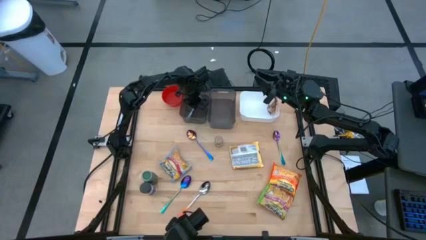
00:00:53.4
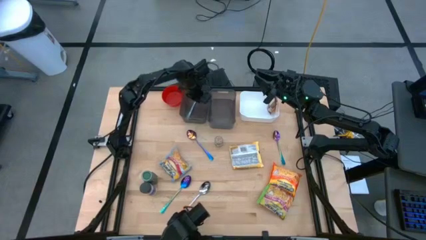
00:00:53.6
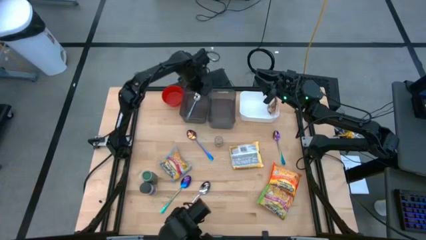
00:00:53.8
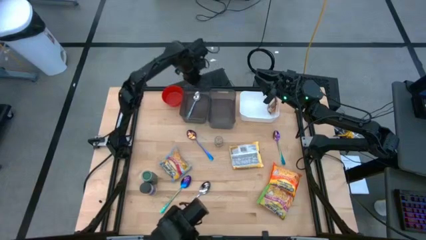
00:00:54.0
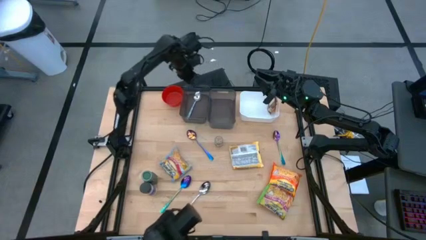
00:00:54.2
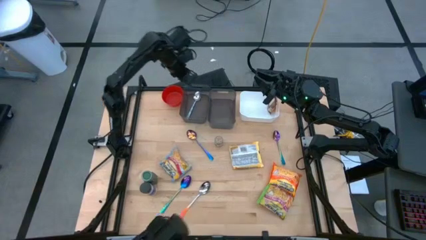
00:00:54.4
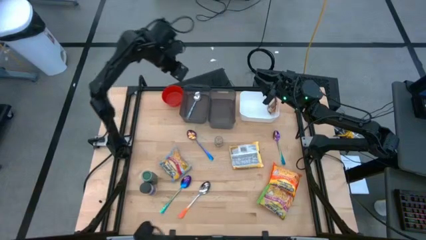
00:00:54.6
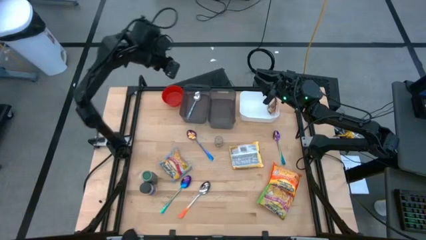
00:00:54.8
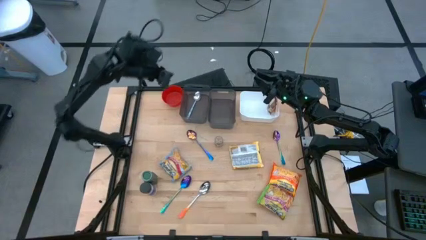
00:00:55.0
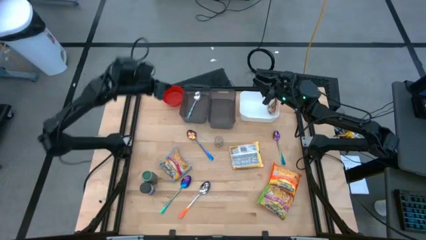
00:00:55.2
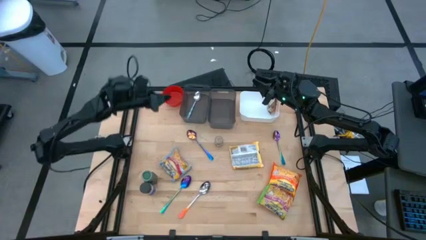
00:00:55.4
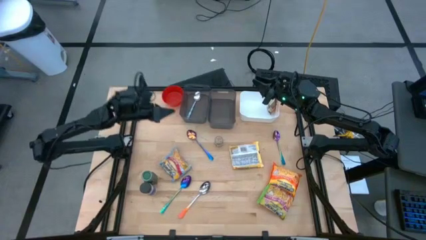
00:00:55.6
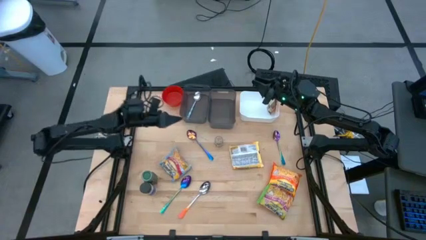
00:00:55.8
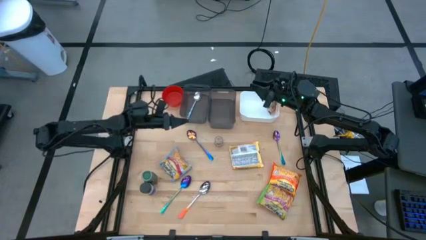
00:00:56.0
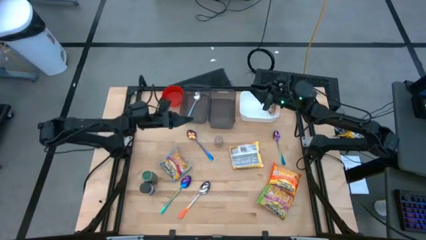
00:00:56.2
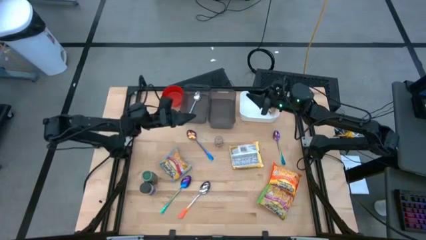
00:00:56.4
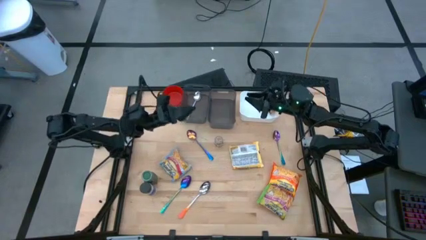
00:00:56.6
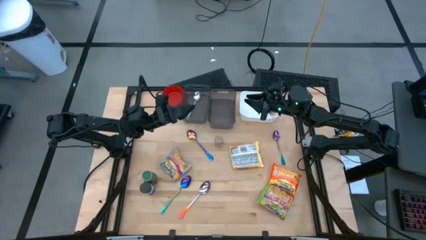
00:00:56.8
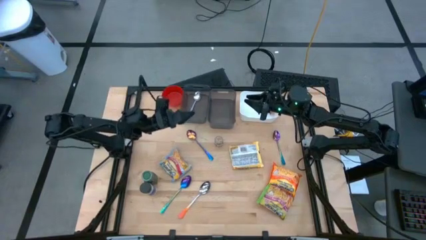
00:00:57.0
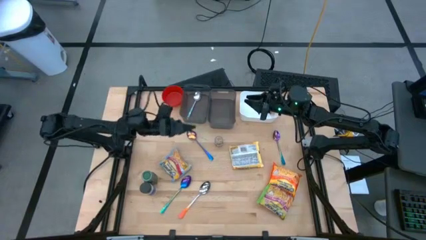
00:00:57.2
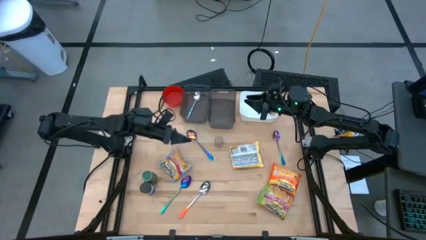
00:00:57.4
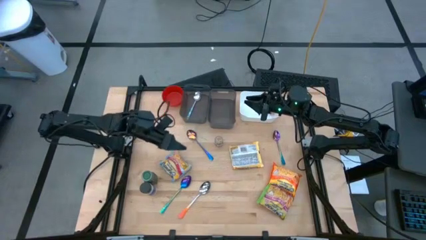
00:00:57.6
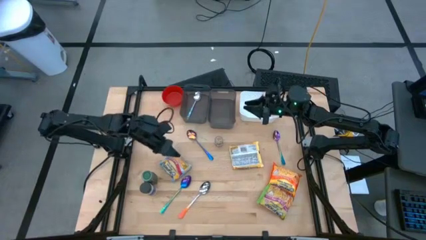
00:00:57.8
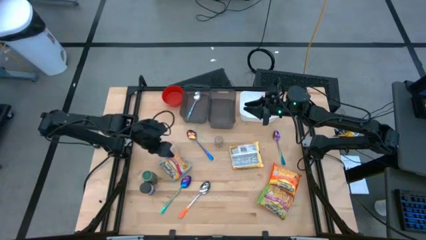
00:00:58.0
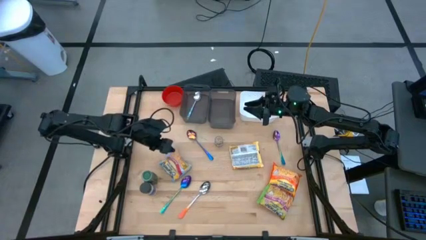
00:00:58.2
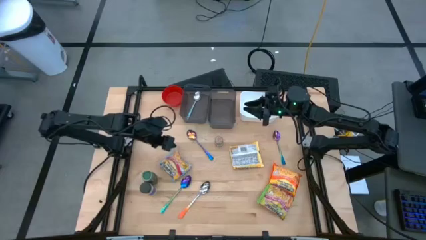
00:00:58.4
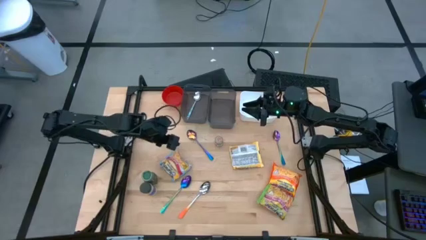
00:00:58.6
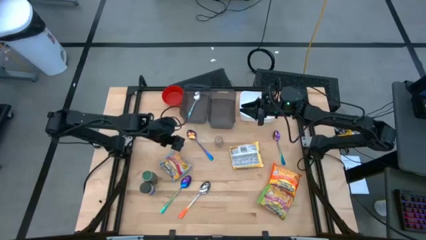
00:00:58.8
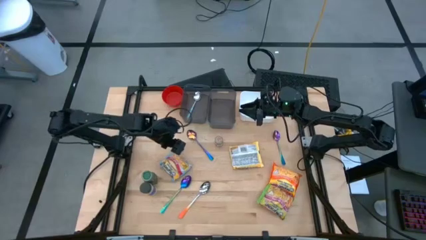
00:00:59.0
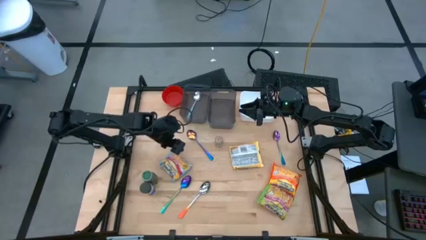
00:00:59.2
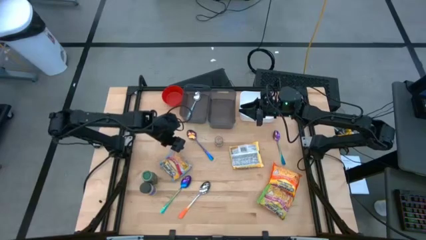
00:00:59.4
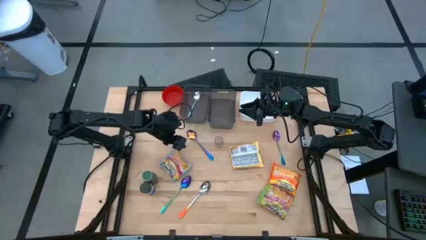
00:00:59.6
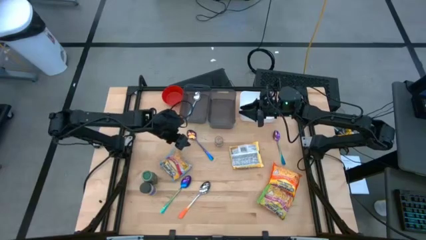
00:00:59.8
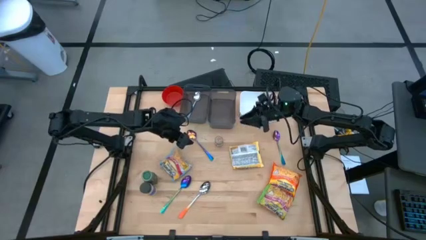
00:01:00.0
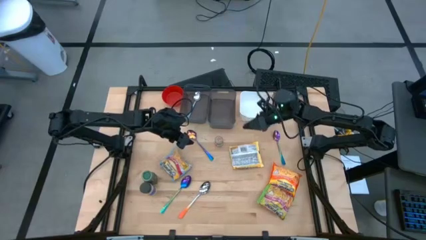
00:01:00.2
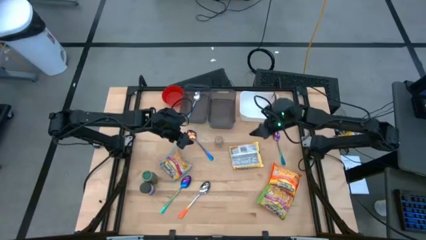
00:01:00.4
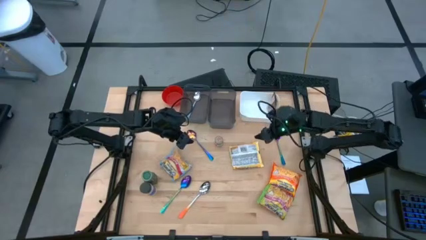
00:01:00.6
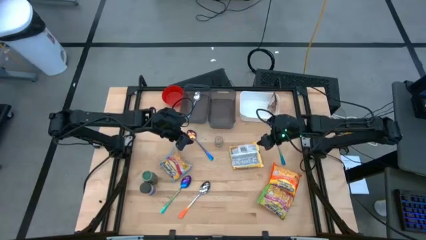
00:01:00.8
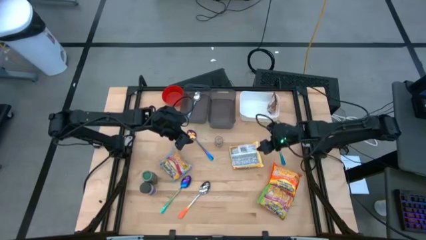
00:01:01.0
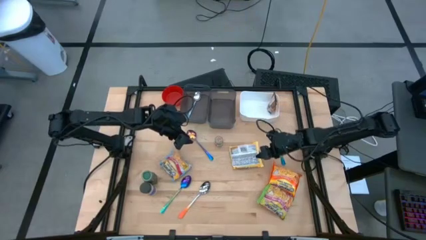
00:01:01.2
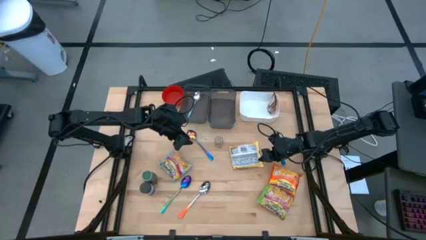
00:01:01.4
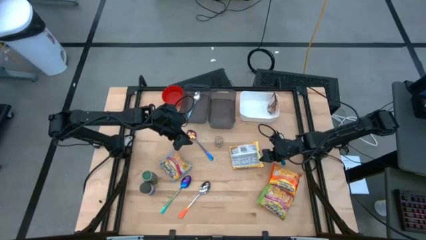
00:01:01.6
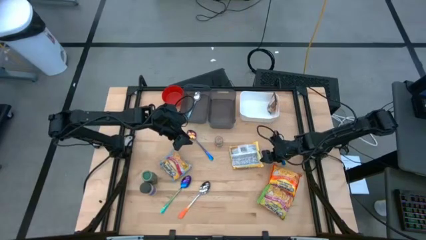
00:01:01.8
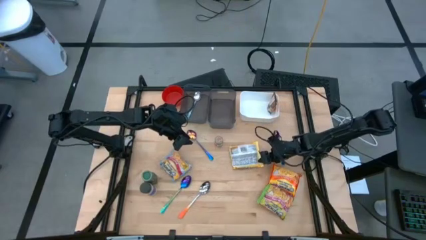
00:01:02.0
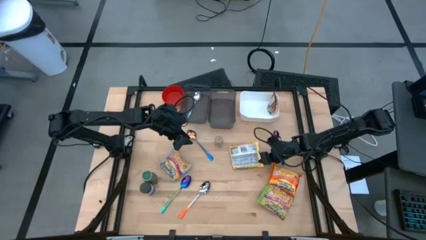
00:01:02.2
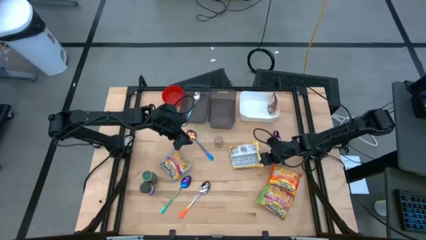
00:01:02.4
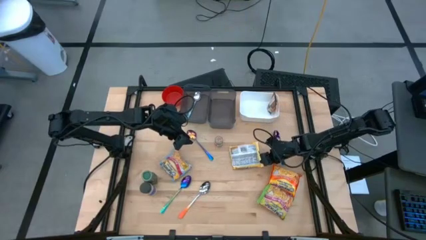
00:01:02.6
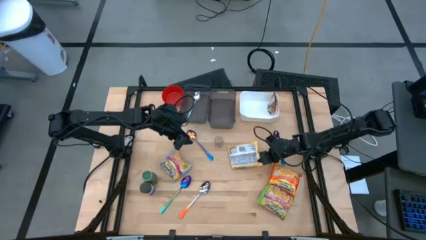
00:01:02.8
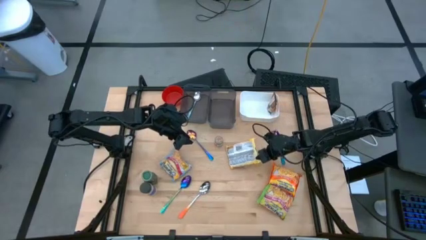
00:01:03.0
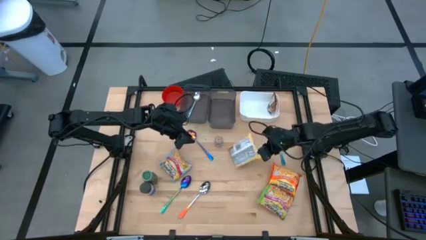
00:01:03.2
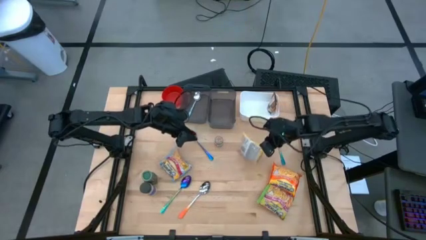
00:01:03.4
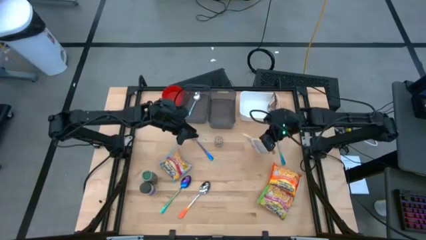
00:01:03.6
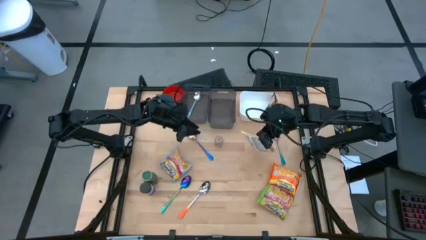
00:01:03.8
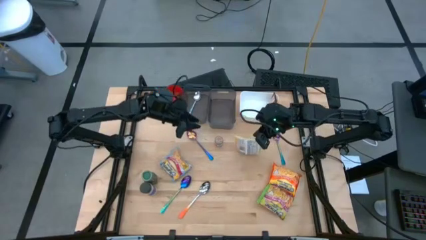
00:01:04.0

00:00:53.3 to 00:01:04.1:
Task: Pick & Place Food Item
Put the yellow noodle pack into the right black bin

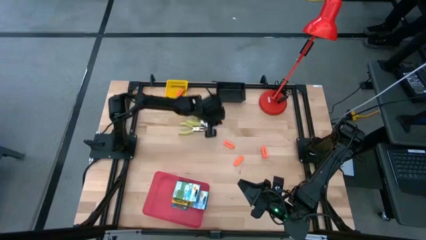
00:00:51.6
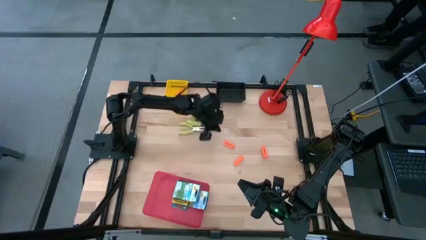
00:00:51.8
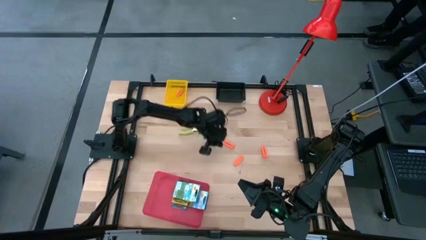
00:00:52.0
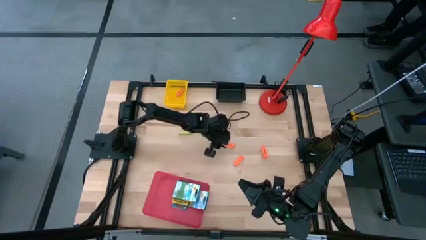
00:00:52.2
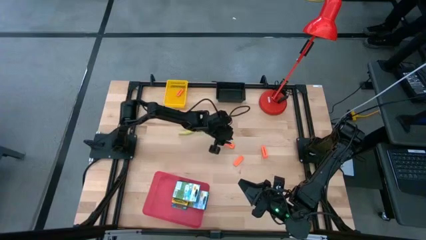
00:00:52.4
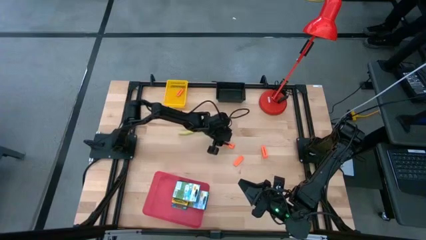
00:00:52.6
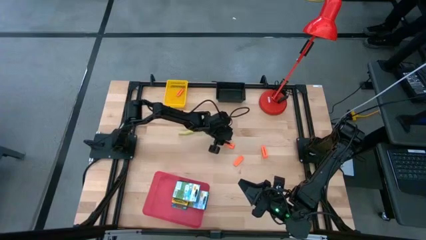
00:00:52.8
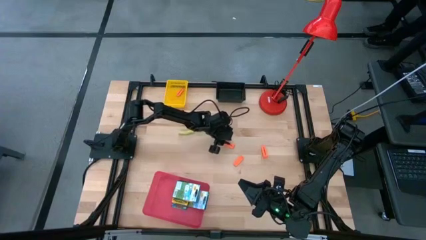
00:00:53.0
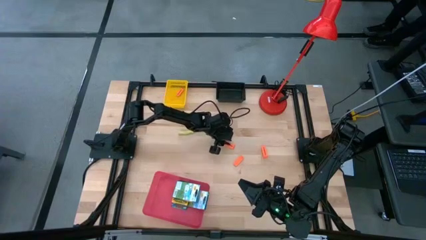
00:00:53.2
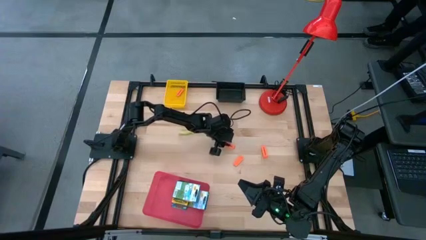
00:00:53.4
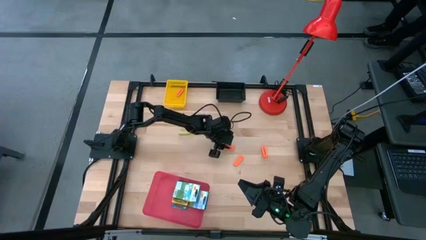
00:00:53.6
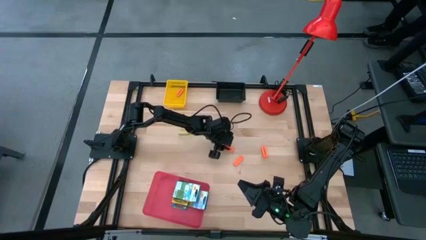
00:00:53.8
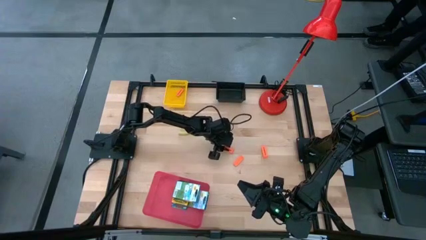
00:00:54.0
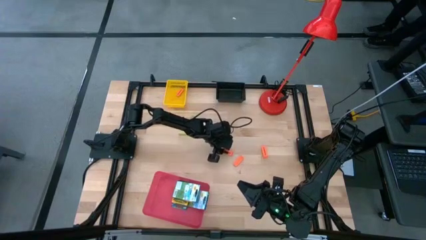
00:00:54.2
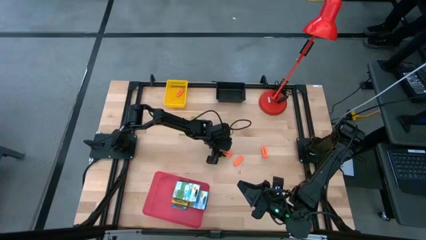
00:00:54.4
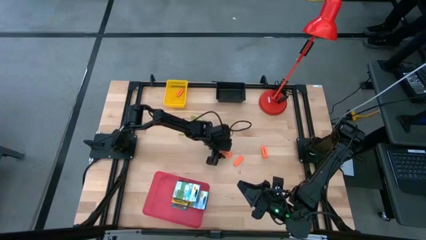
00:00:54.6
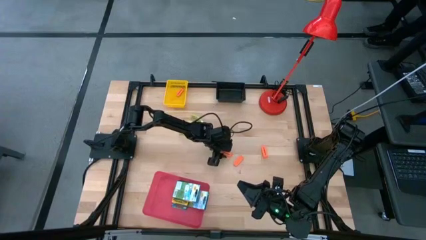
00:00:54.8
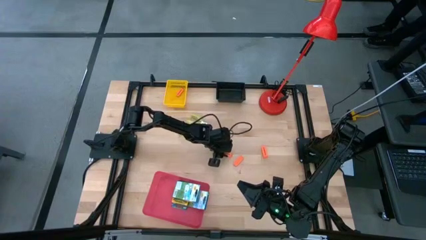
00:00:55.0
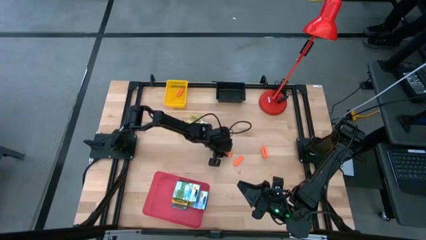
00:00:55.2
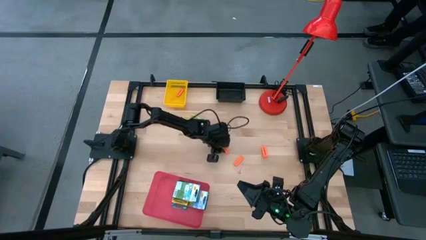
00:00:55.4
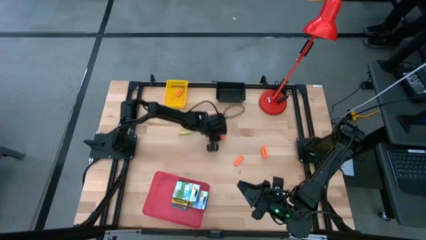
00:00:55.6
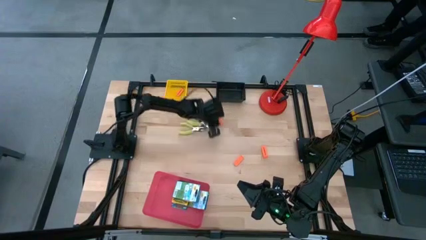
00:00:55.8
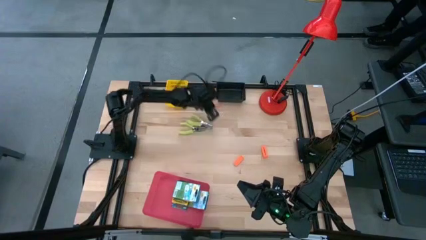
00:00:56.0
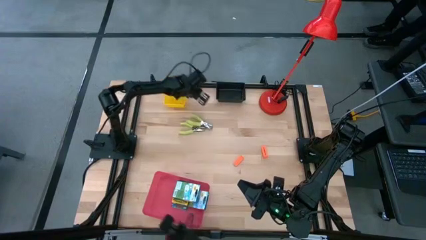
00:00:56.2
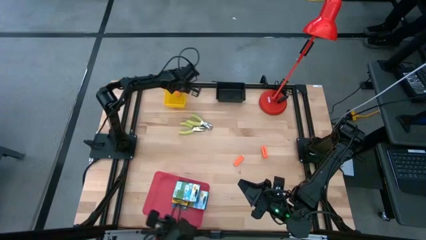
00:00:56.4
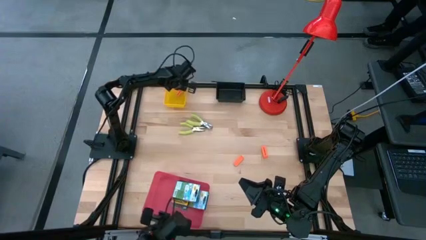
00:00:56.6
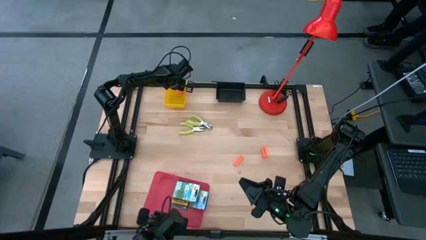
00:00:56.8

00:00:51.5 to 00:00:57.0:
Task: Pick & Place School Supplies
Put the orange eraser into the yellow bin
